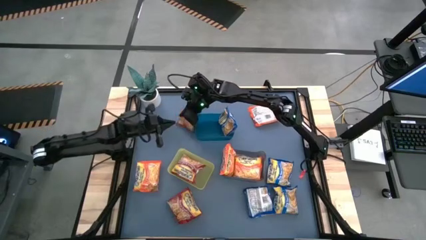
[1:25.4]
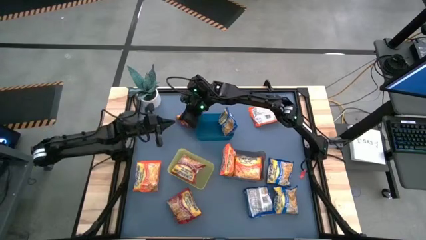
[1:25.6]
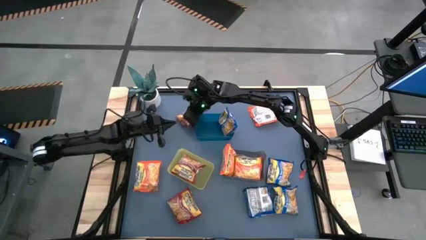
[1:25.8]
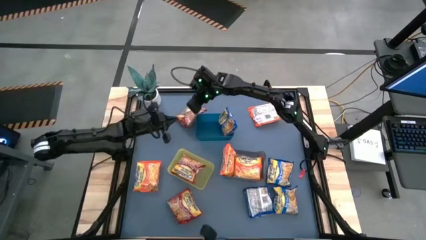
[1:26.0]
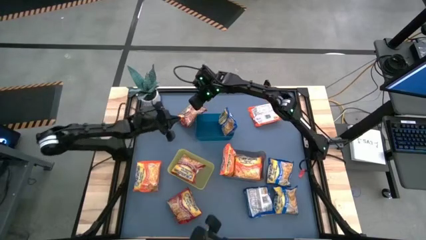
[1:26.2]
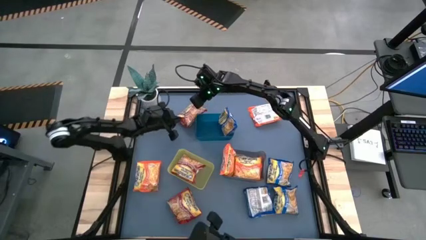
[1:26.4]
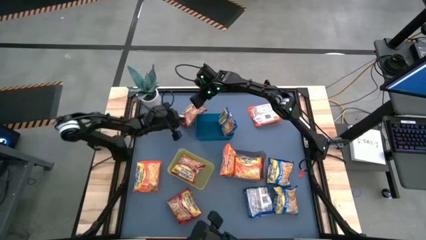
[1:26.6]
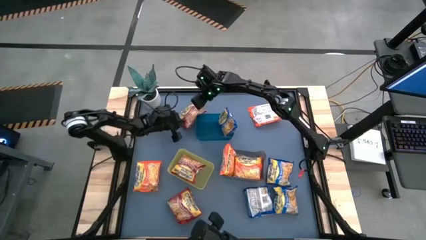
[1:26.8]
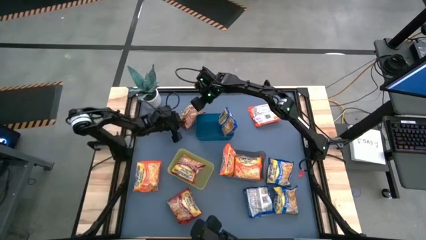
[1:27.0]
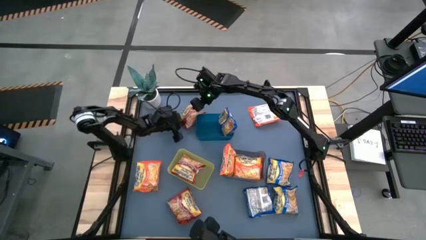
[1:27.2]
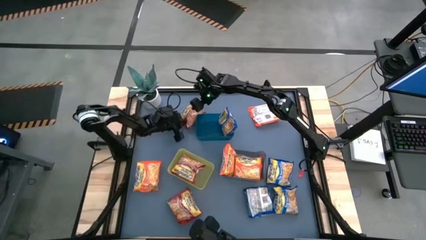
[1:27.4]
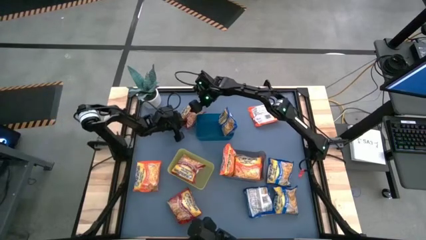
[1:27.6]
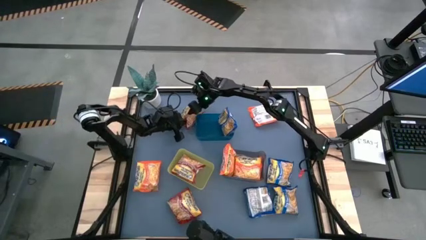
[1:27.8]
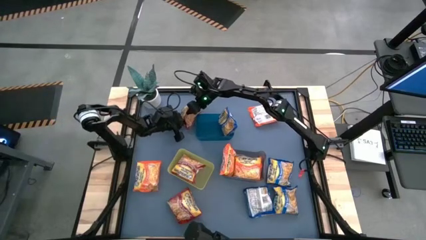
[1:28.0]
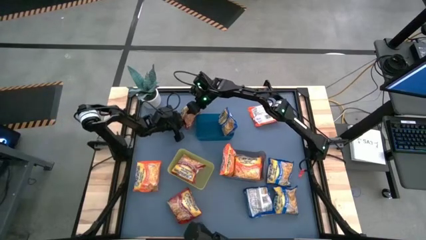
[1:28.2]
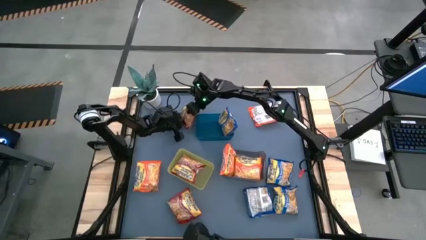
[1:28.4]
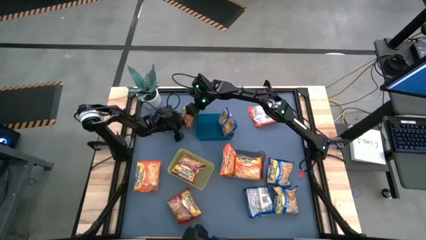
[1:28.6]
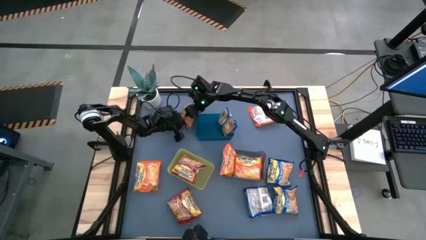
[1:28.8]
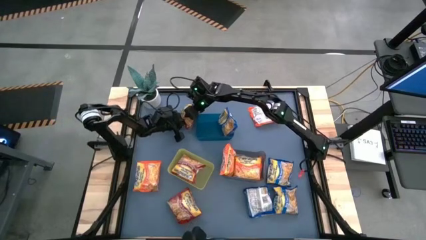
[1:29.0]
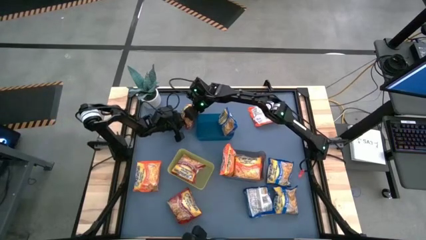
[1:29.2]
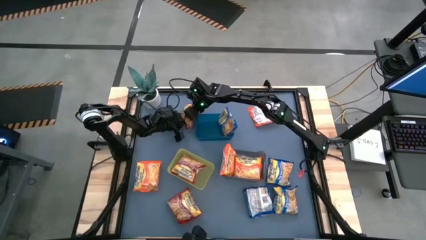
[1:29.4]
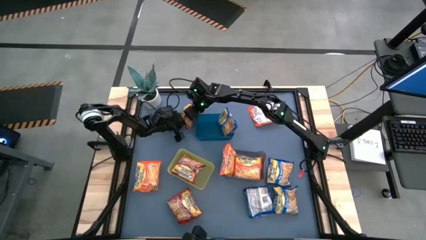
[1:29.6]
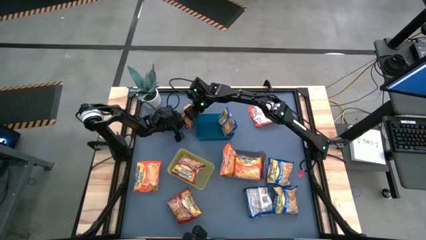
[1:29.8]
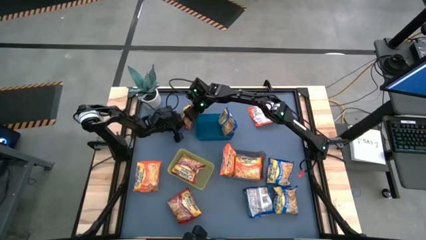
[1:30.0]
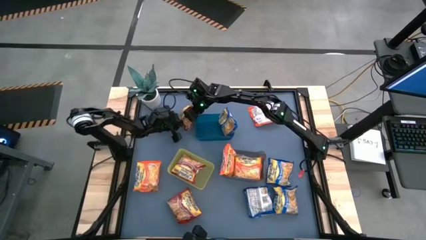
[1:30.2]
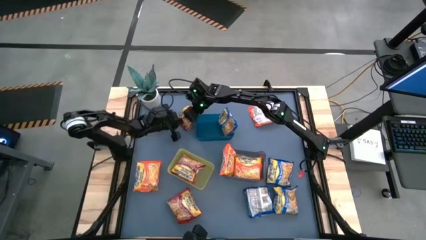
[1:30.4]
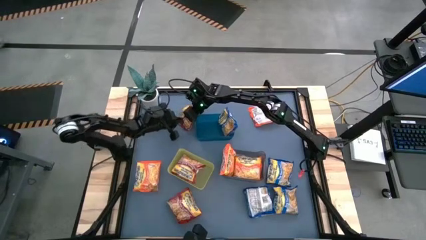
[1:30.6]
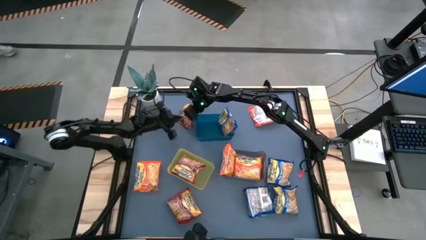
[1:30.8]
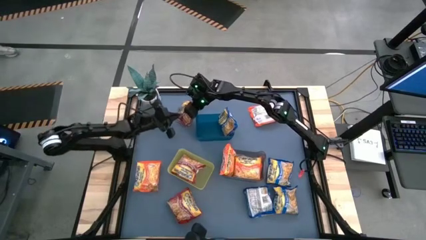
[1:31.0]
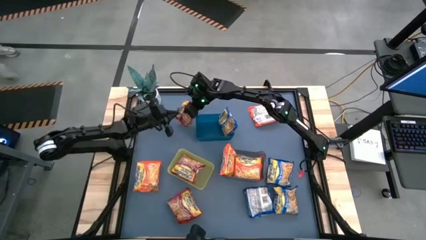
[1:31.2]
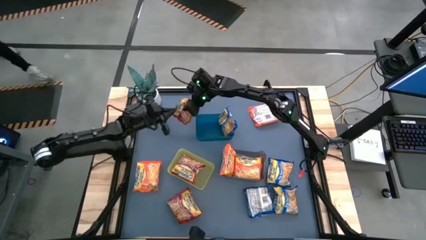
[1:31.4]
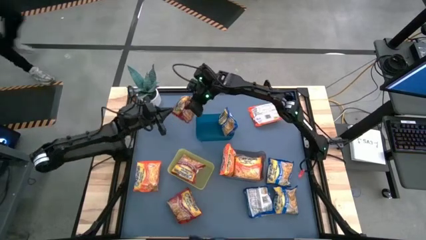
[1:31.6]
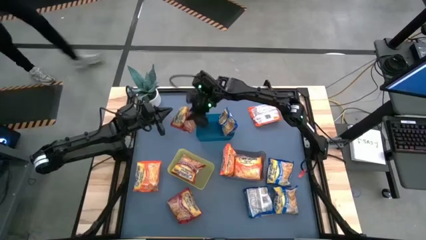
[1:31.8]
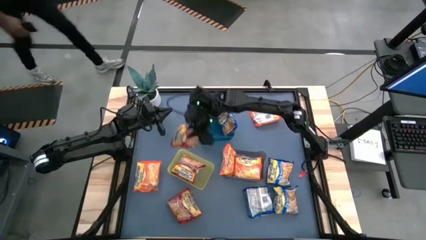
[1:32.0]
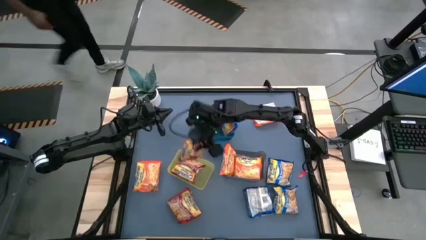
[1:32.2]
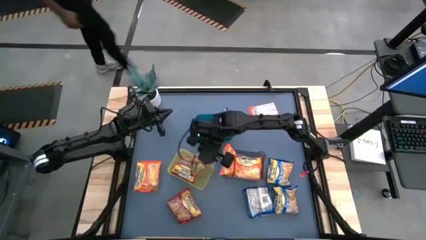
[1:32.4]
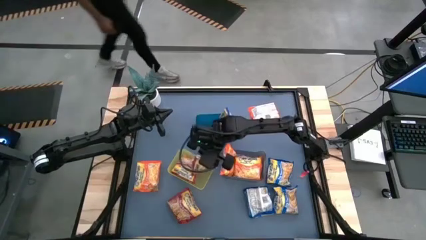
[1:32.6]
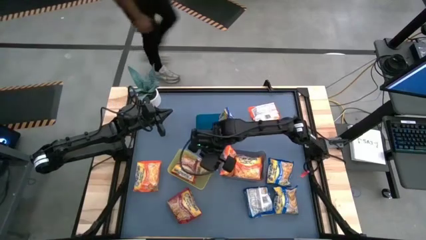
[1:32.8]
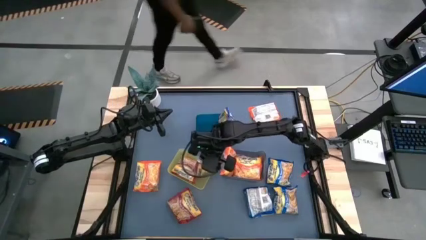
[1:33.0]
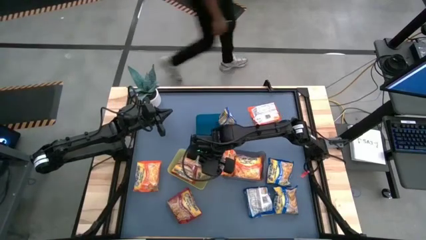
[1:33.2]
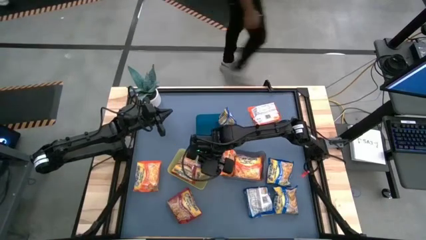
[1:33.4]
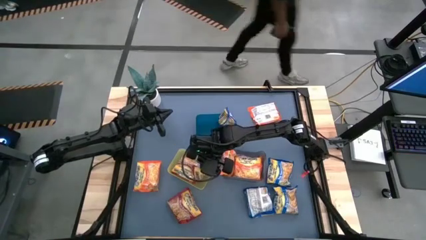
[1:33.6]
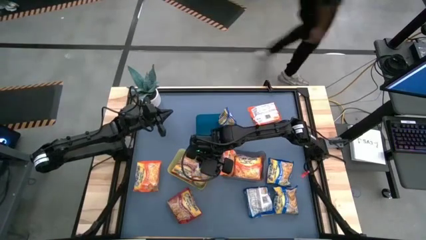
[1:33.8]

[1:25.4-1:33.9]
Task: Sort Maruchan noodles
Put the red noodle pack into the yellow bin

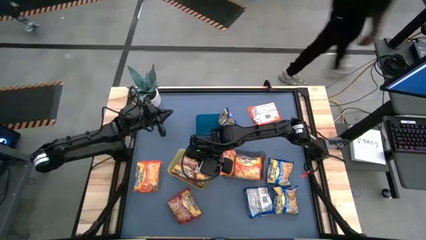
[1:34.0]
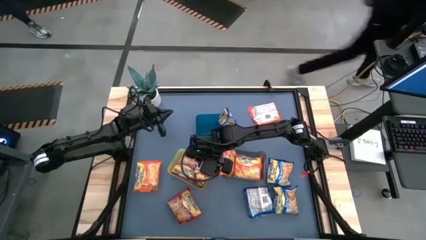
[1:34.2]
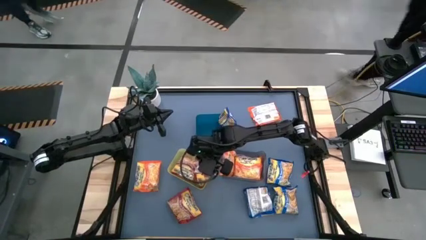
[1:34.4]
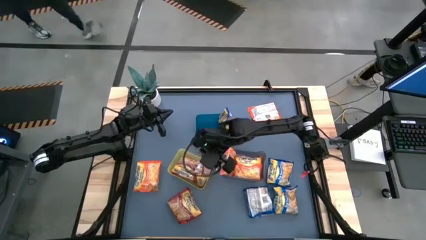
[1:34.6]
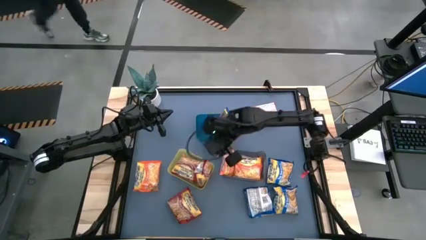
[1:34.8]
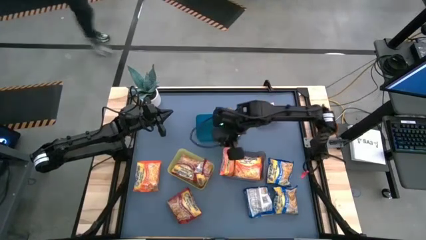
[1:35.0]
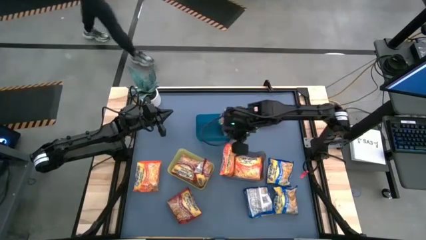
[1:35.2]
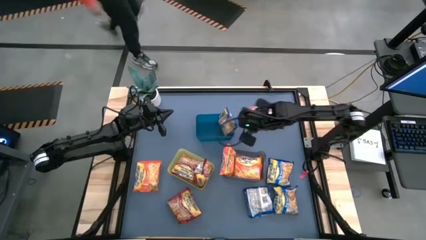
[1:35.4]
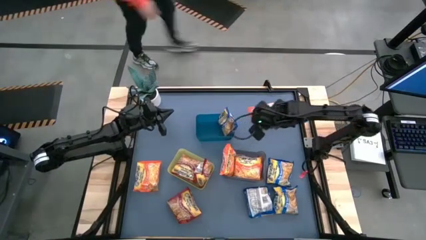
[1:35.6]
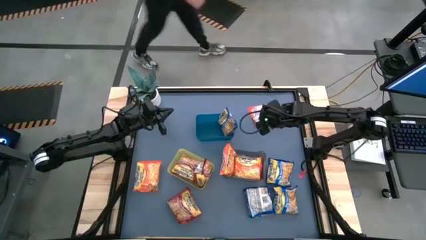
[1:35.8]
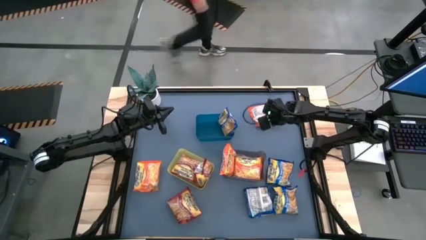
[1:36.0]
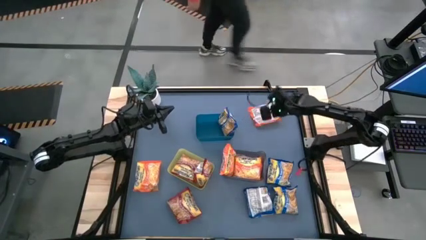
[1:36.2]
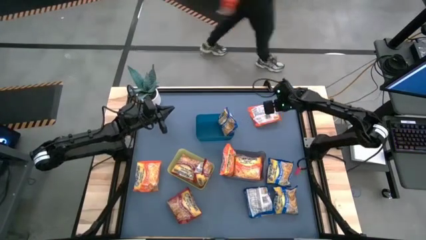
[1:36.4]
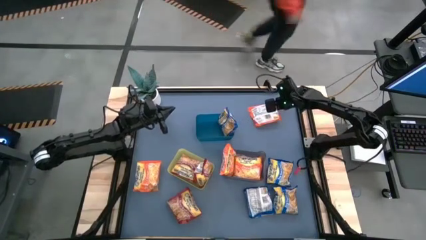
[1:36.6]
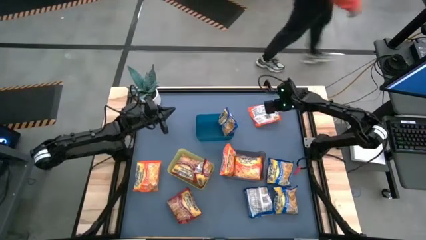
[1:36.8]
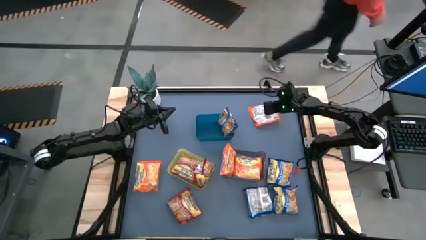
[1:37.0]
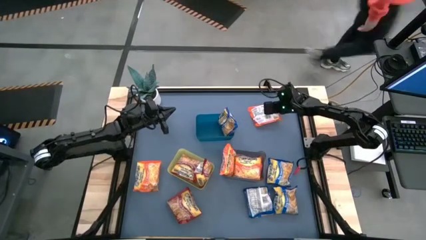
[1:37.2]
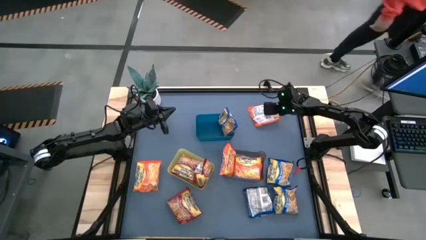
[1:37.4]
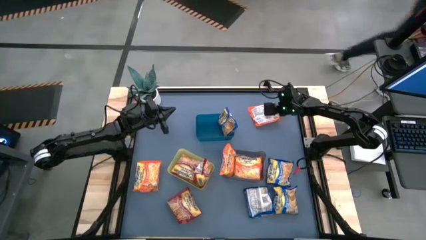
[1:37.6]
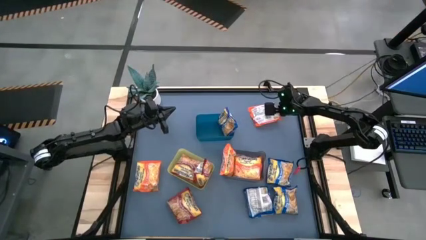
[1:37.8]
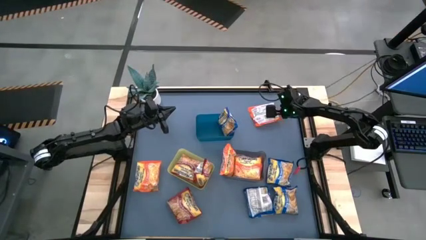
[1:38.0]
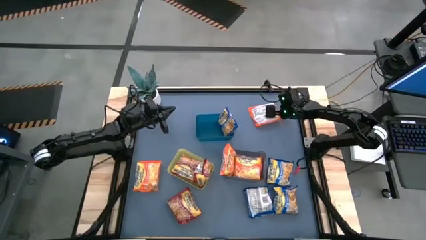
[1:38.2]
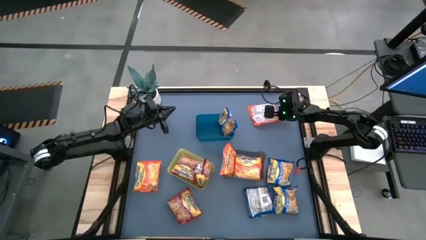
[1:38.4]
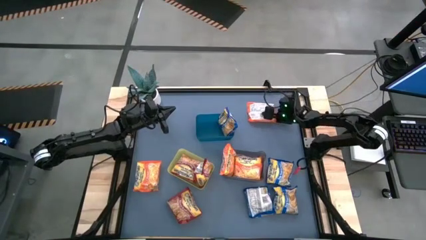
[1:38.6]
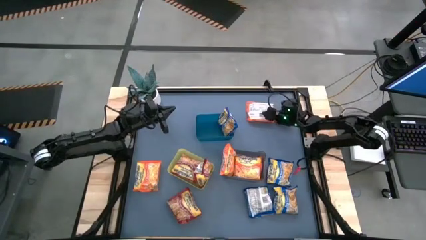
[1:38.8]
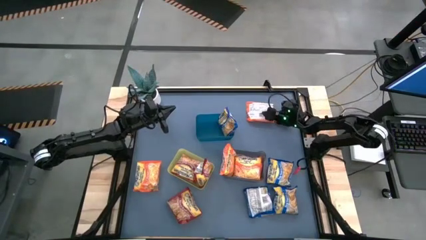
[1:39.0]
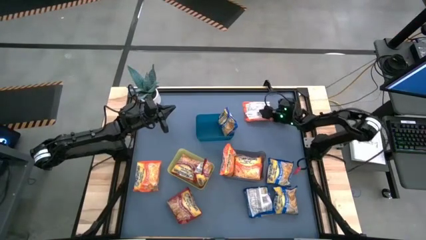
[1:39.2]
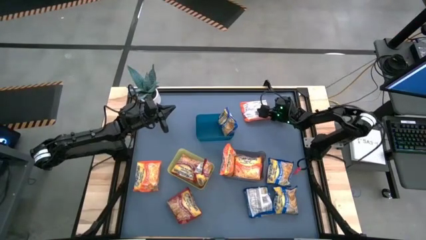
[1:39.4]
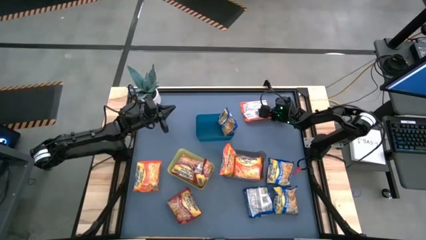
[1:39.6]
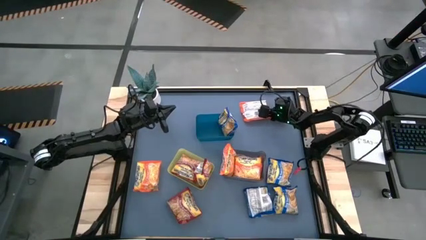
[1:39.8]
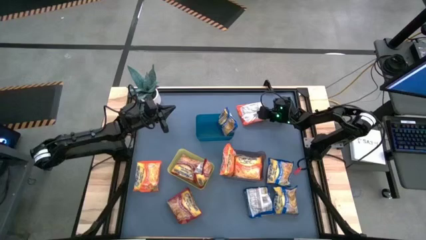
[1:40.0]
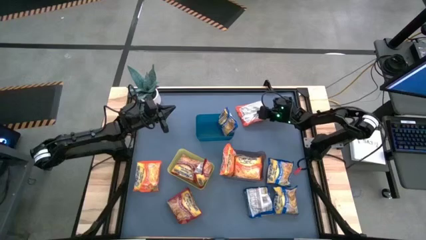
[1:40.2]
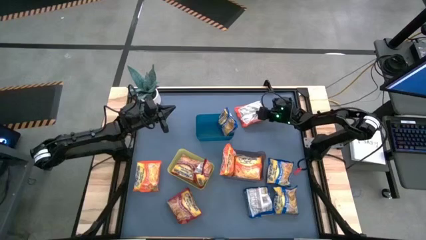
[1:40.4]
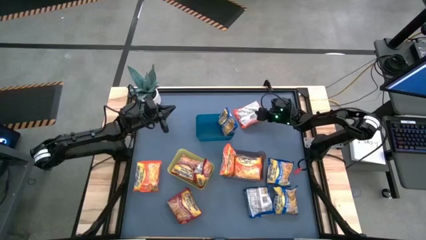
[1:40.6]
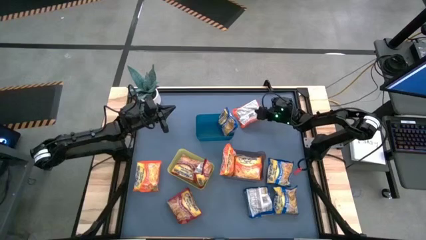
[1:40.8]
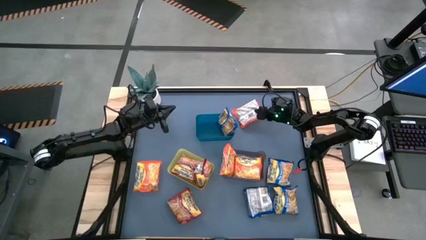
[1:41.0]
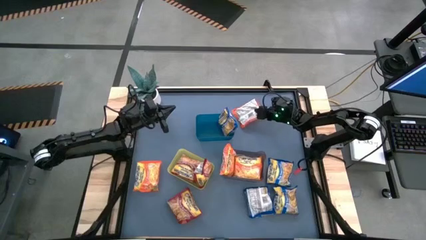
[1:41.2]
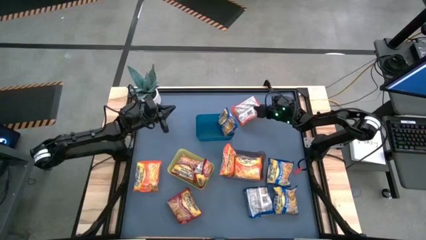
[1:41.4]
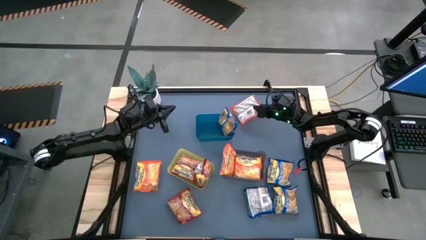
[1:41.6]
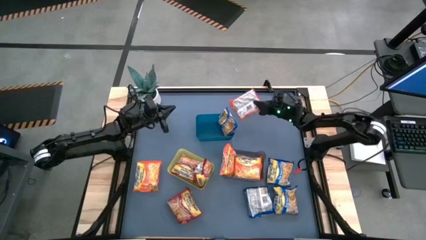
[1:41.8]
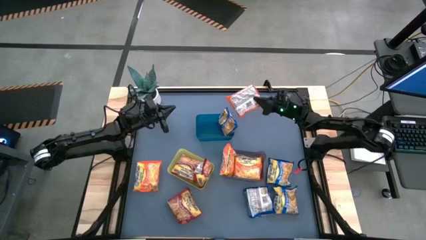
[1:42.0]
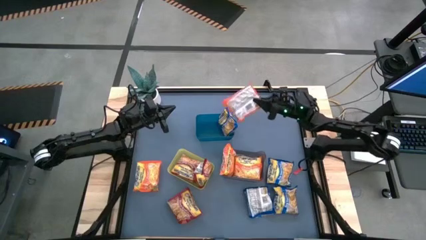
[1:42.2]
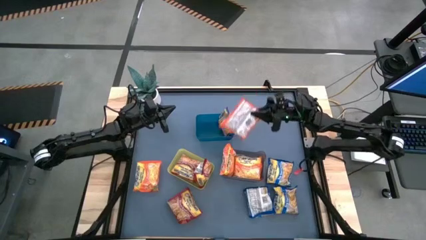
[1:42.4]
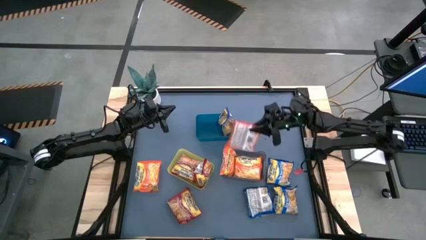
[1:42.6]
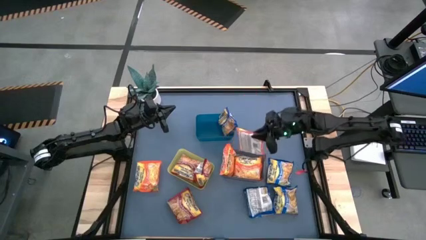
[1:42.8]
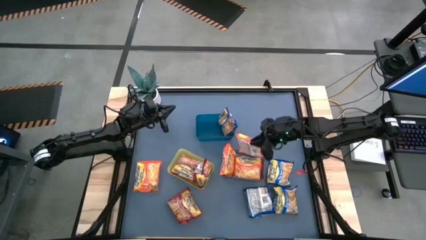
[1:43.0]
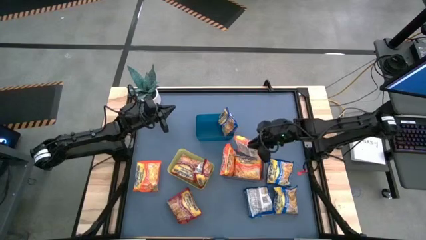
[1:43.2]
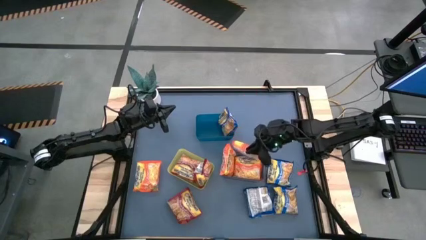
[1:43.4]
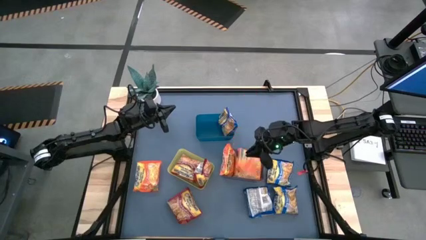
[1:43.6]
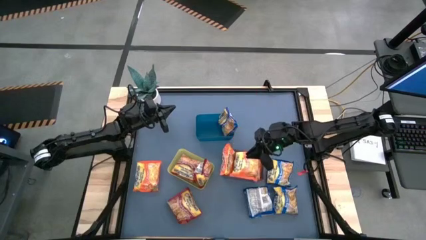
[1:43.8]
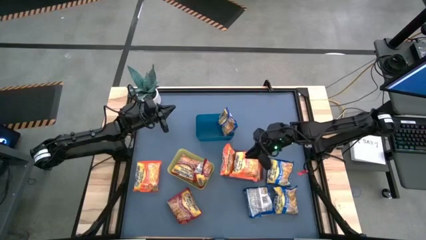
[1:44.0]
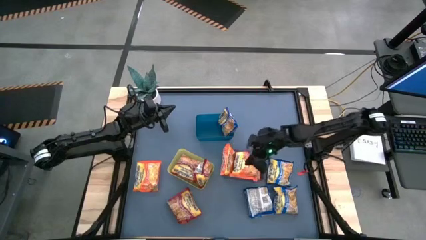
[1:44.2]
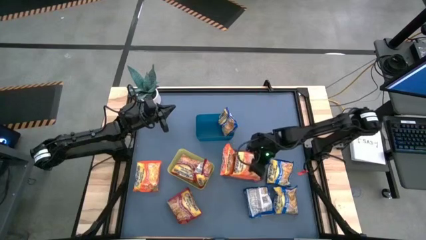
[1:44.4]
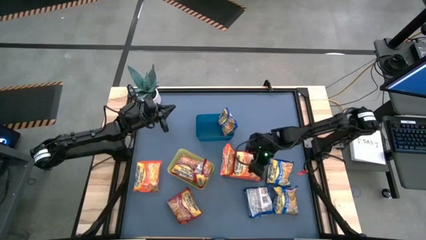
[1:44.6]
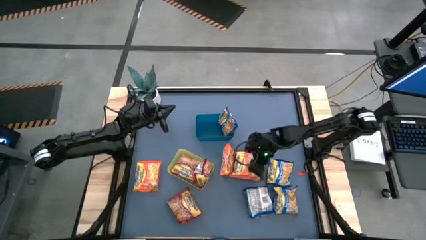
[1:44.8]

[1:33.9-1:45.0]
Stack the orange noodle pack on top of the orange noodle pack in the black bin
